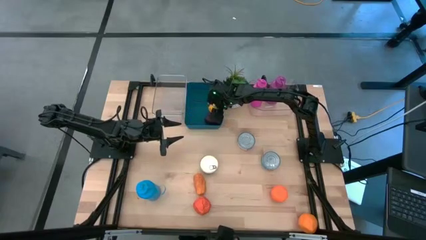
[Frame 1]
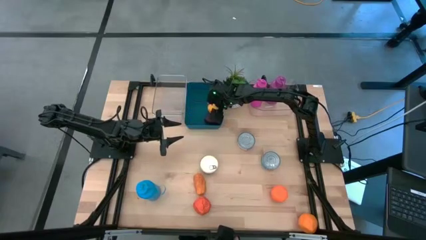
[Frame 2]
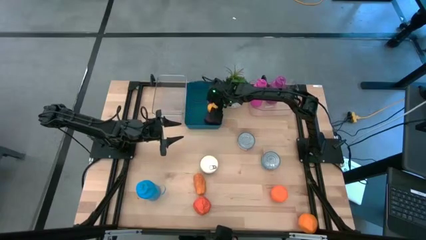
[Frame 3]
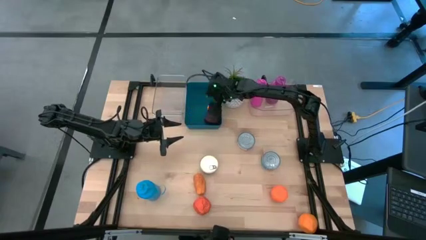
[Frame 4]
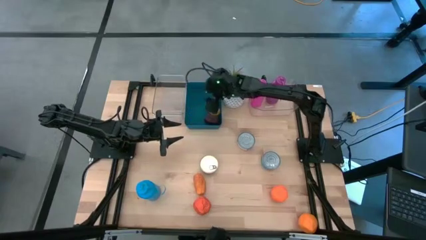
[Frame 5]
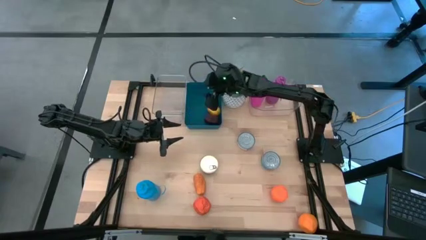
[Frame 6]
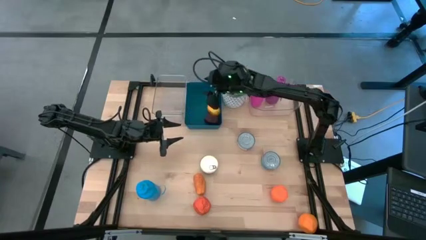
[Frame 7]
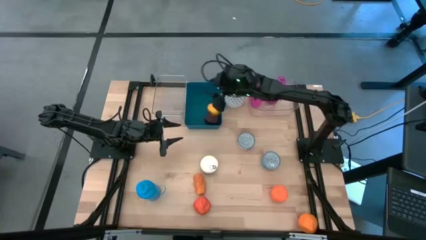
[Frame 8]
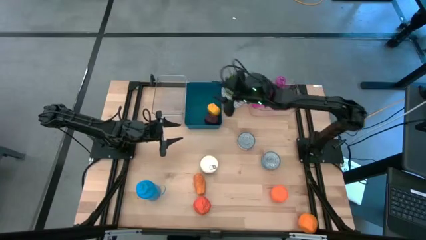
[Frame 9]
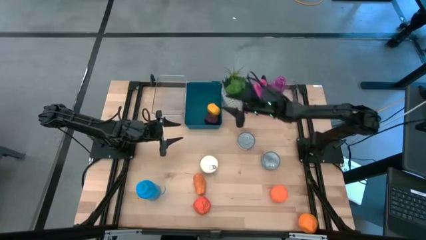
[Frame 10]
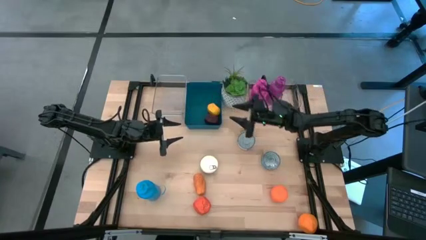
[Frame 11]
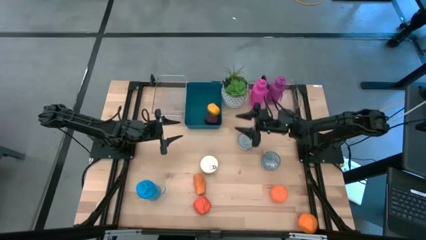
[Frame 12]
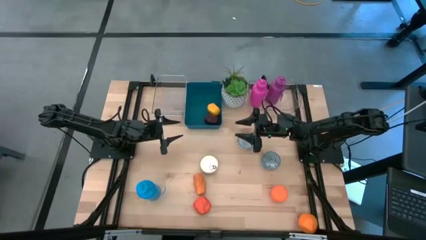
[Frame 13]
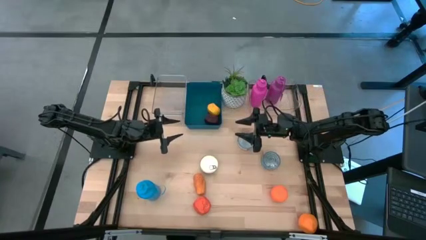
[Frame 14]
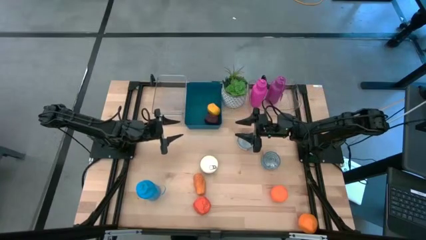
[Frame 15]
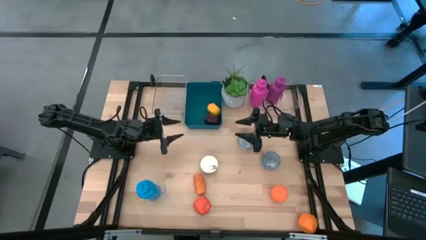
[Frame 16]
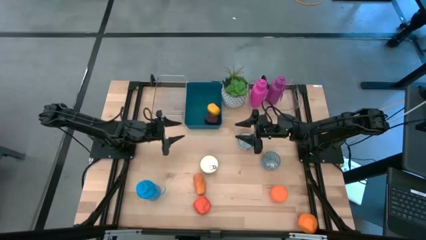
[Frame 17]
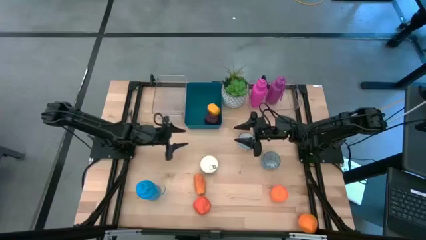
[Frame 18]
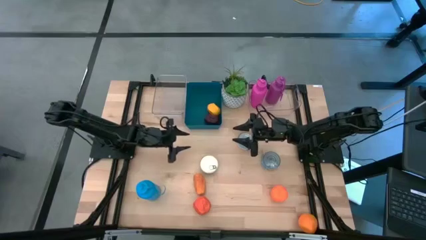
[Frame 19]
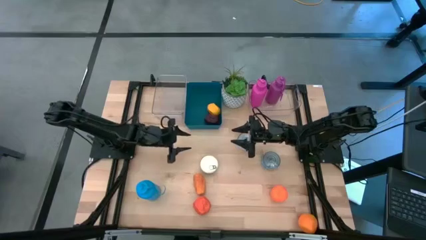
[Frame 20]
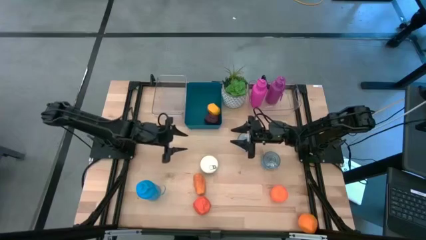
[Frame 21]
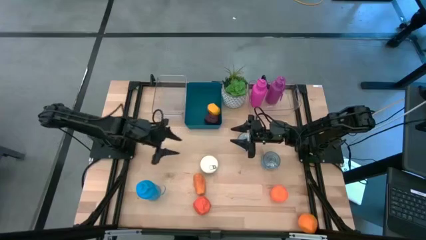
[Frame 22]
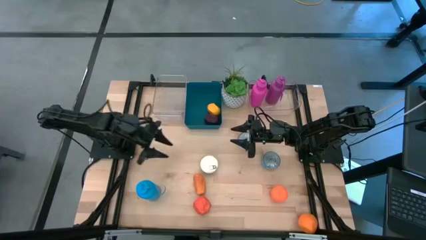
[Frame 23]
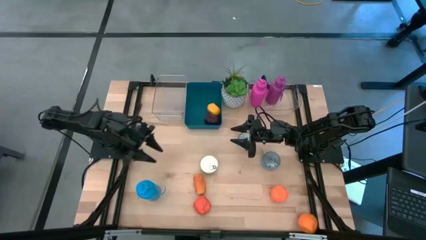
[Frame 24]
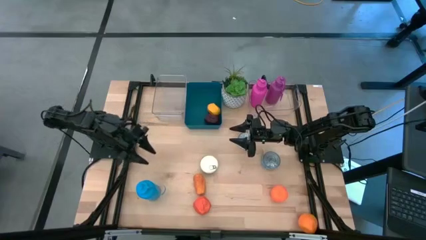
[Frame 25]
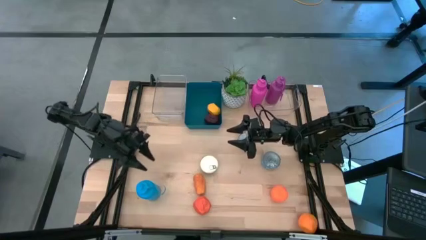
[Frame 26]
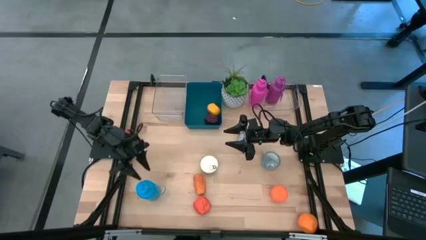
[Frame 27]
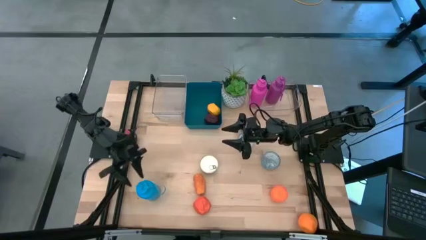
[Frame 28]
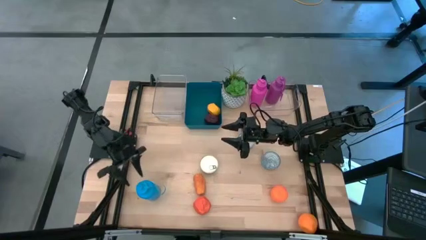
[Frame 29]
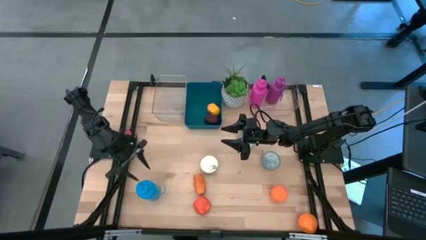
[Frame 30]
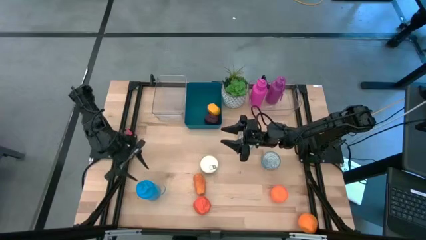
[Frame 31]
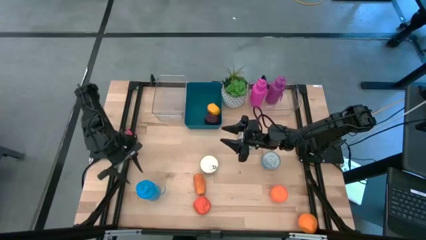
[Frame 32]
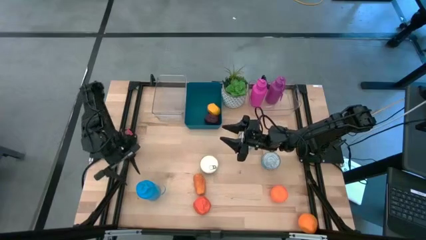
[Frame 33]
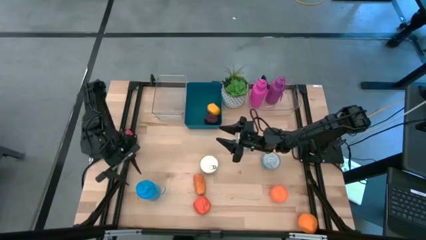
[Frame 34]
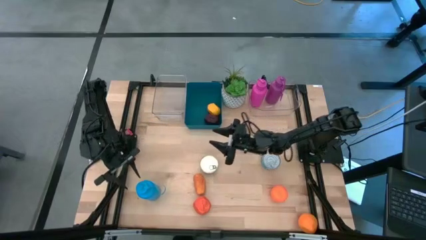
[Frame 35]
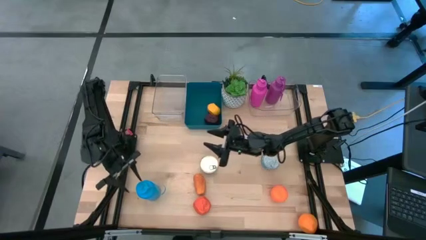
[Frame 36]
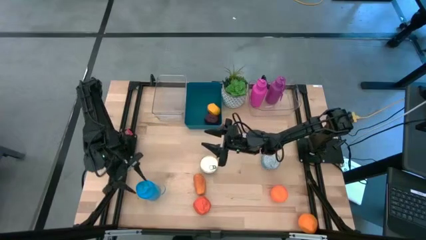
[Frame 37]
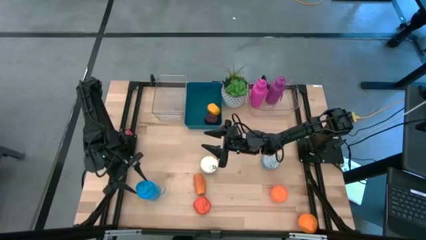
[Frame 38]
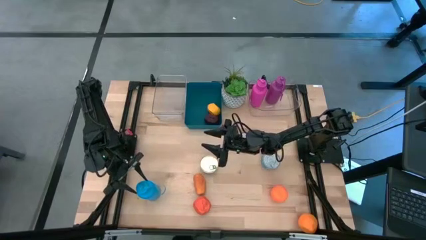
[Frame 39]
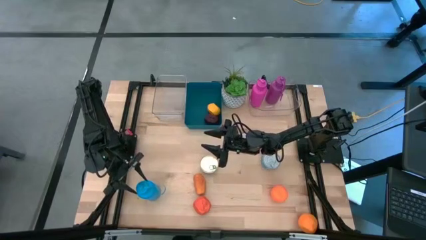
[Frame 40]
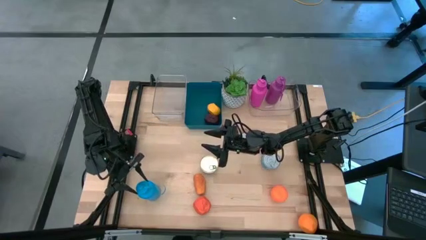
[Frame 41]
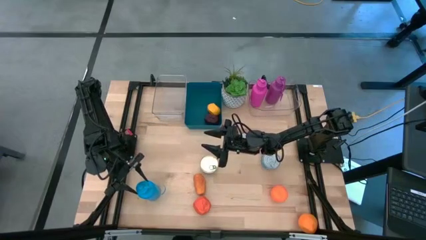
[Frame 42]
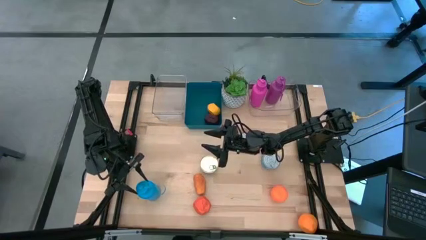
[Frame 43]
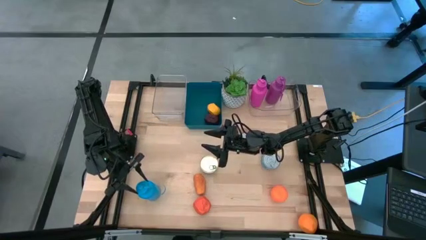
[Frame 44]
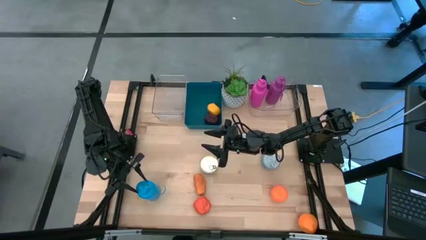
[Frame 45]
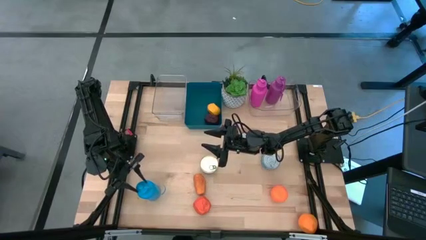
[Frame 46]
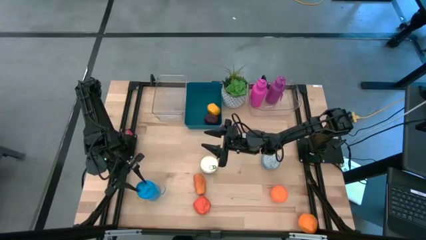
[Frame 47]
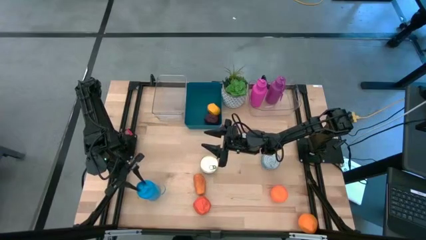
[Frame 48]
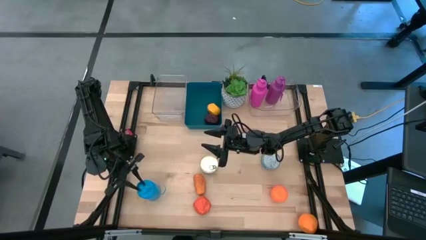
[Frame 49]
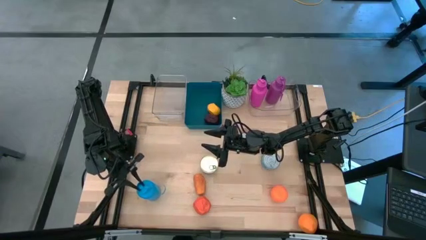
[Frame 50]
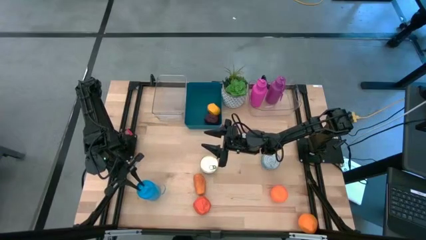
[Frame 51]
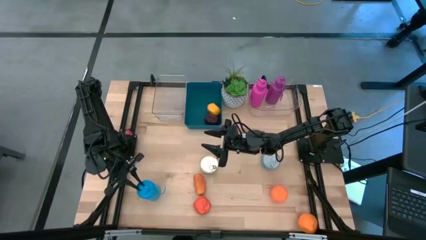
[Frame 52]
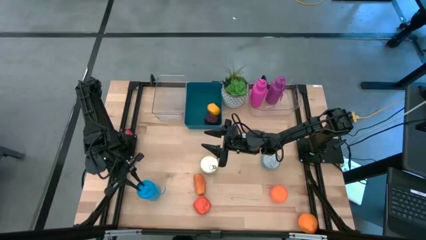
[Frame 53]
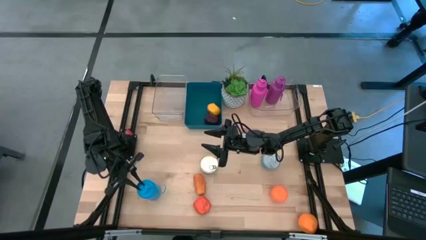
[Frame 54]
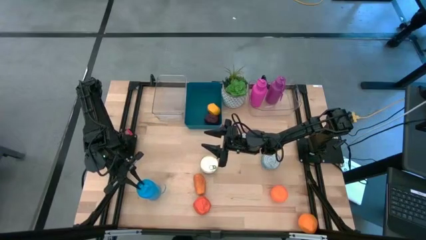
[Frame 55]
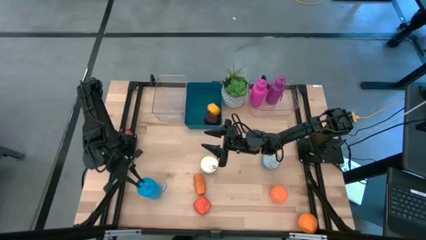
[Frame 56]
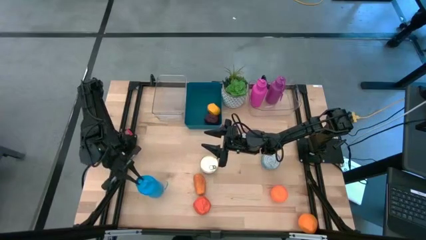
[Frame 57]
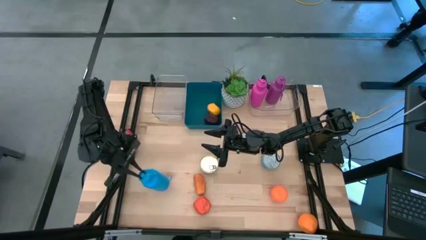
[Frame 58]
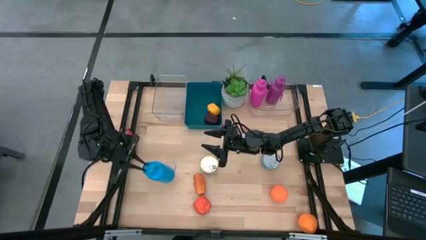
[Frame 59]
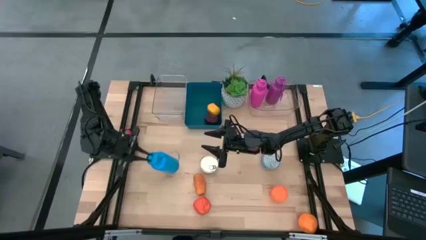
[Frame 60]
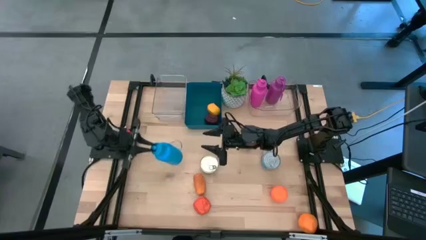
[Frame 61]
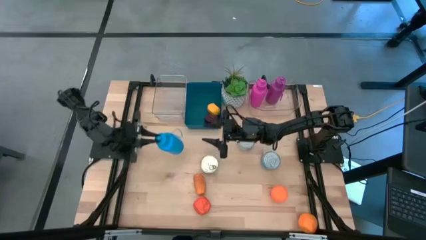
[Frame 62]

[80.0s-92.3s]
Task: Pick & Place Food Item
Put the blue bottle into the right transparent bin

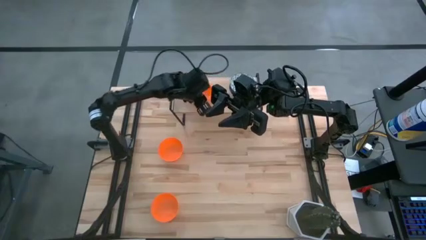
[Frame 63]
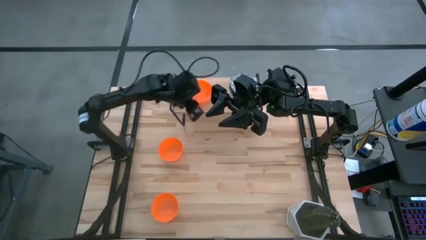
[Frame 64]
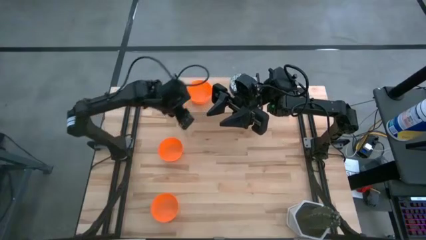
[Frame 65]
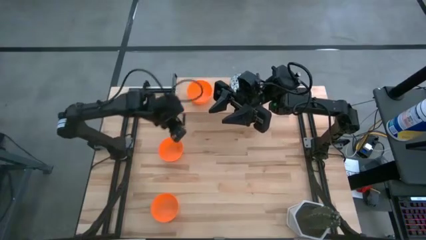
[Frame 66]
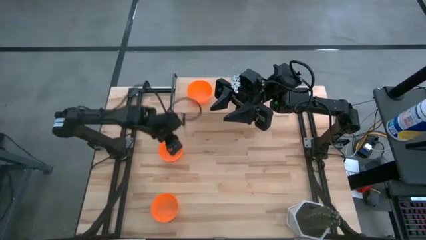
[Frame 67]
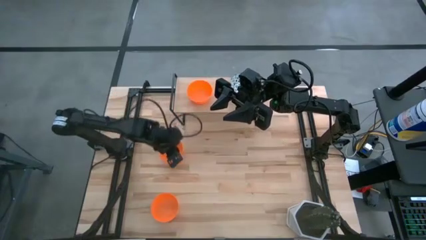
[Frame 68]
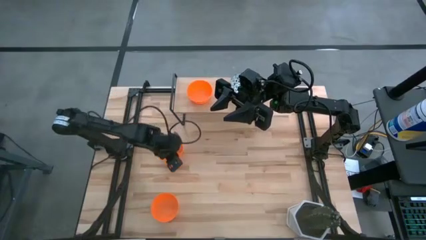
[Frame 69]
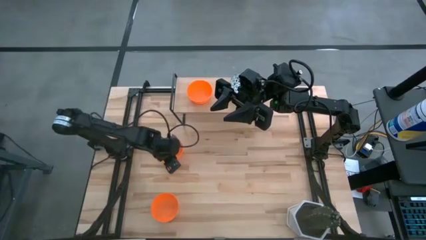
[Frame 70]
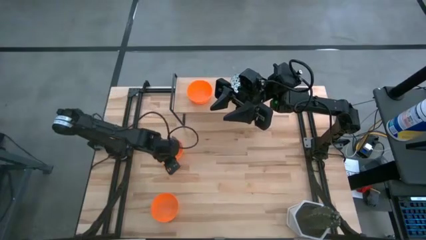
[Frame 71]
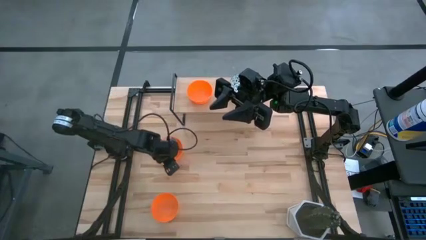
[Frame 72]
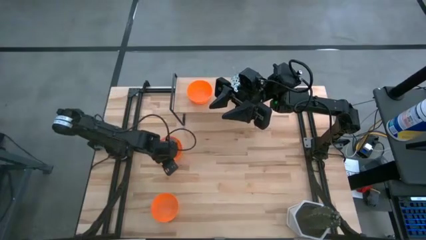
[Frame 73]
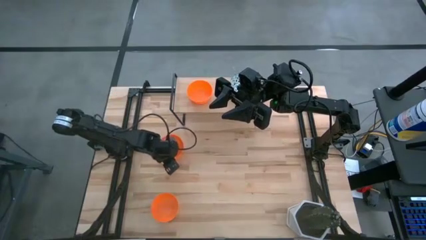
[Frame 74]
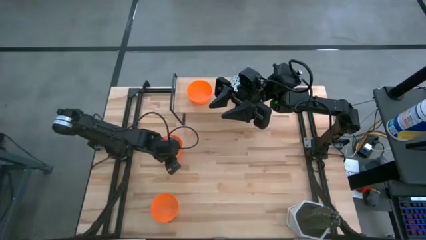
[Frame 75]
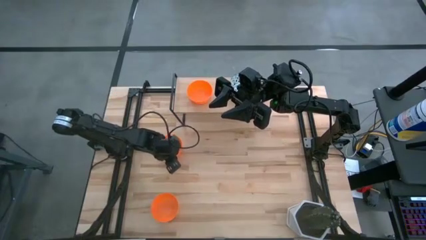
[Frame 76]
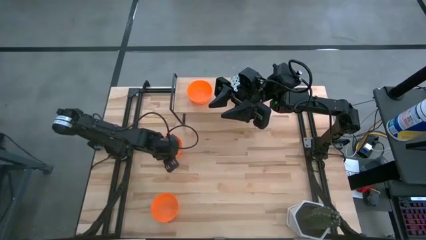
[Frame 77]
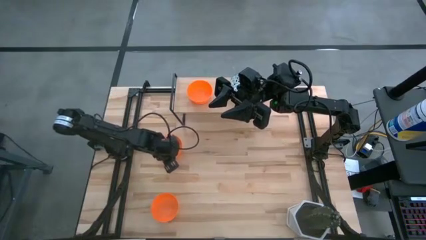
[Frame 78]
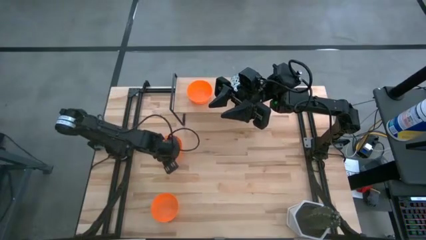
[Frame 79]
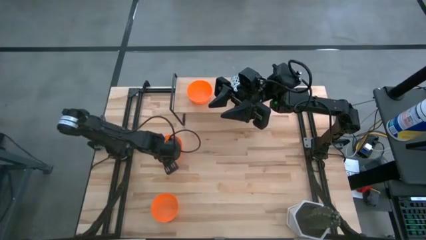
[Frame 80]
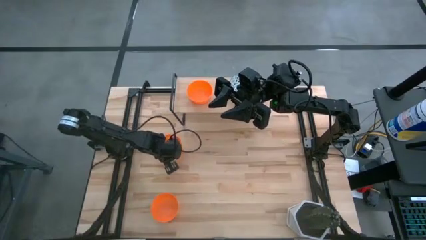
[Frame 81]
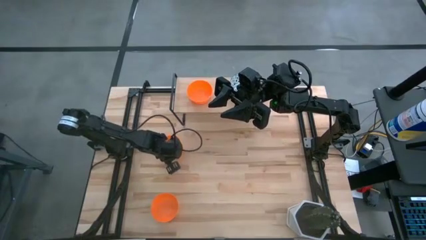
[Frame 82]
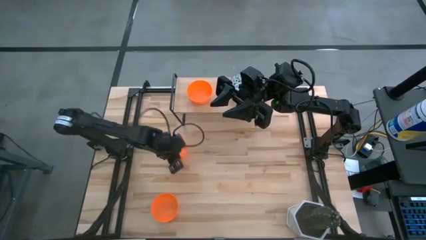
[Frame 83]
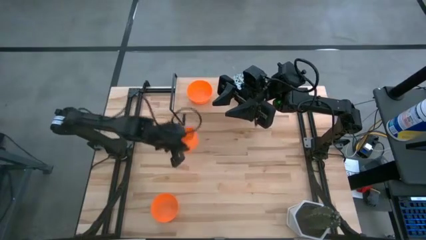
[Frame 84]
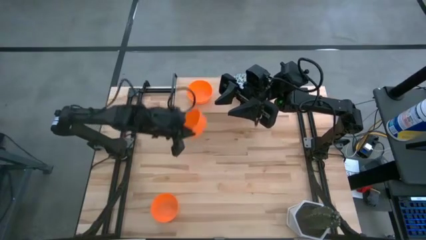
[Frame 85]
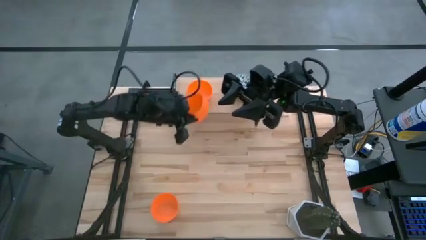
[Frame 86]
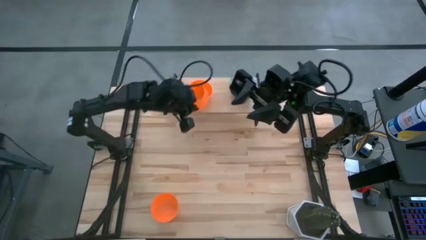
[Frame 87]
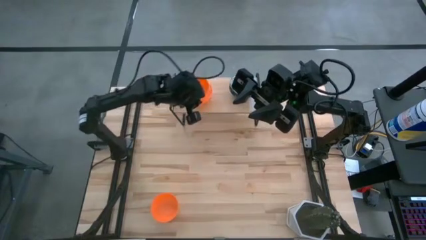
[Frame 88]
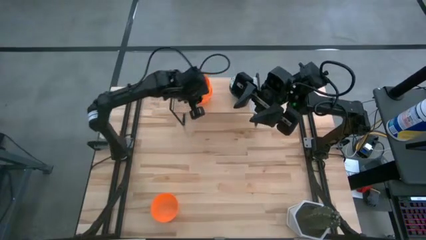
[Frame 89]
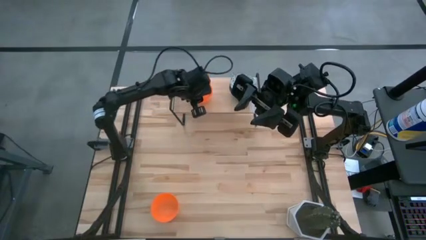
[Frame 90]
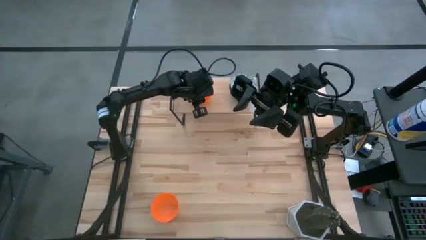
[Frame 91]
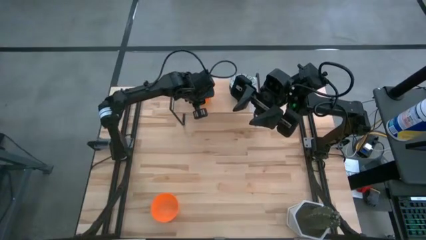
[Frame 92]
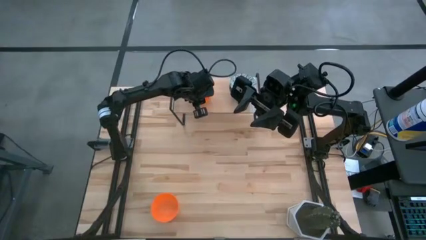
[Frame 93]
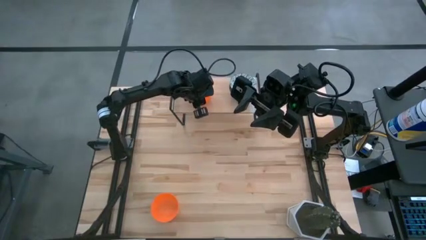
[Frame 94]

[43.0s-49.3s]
Task: Pick & Place Mini bowls
Stack the top orange bowl on top of the orange bowl on the shelf
